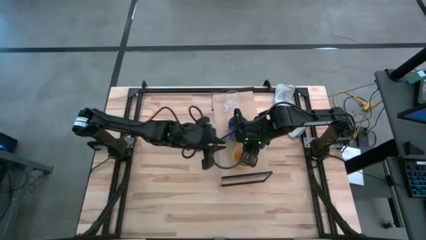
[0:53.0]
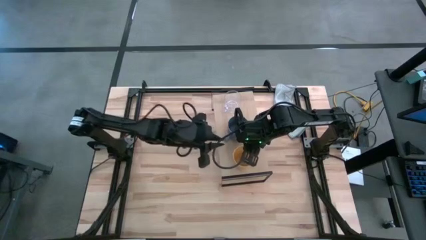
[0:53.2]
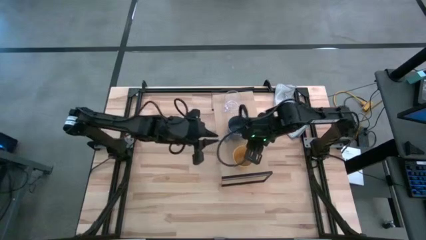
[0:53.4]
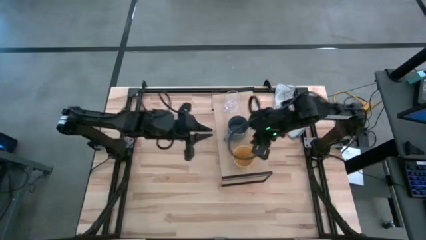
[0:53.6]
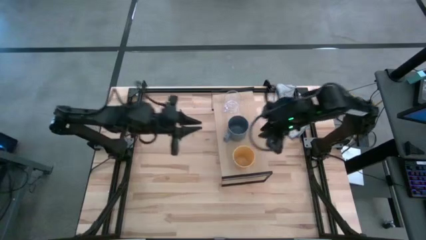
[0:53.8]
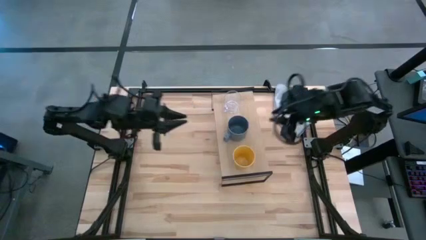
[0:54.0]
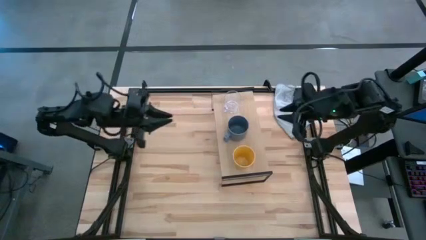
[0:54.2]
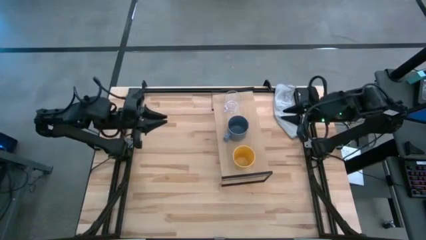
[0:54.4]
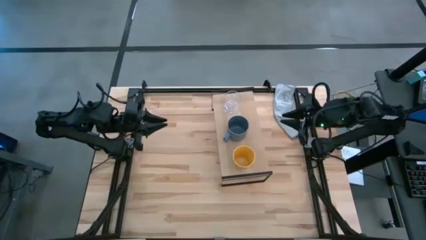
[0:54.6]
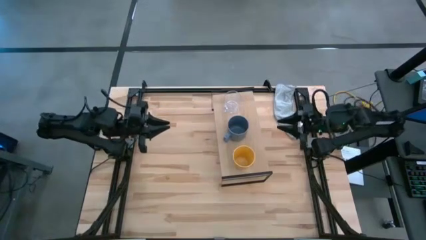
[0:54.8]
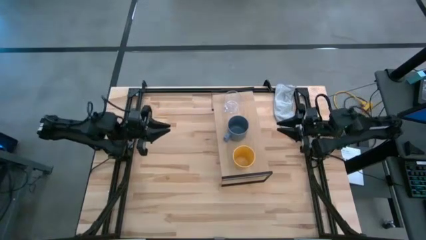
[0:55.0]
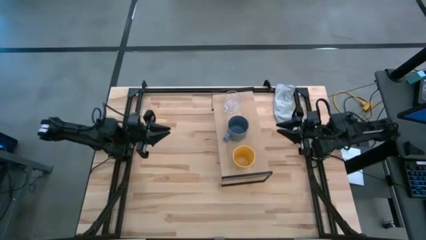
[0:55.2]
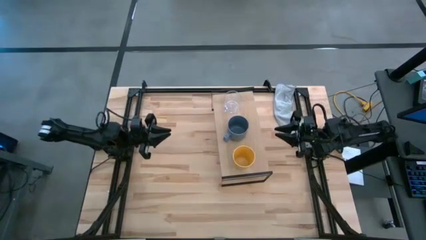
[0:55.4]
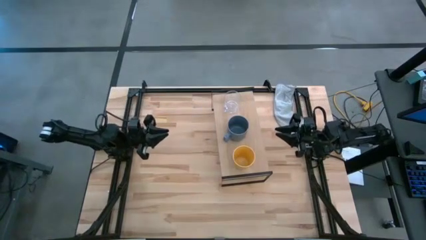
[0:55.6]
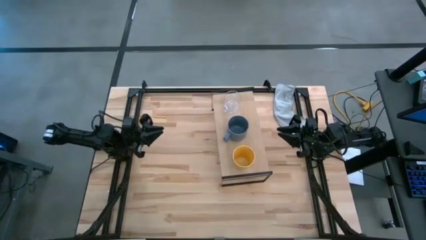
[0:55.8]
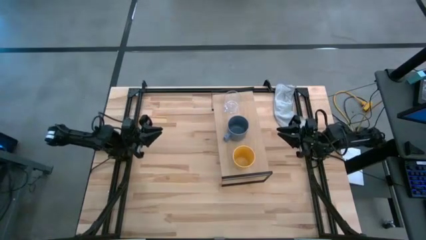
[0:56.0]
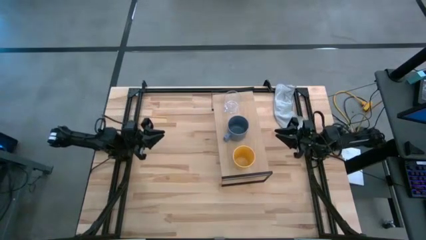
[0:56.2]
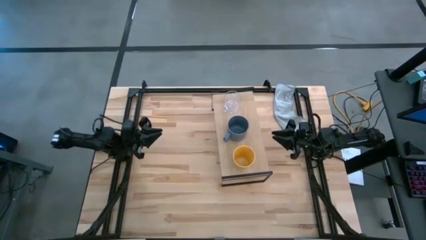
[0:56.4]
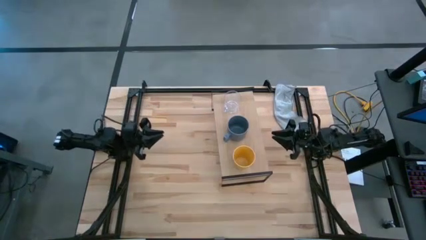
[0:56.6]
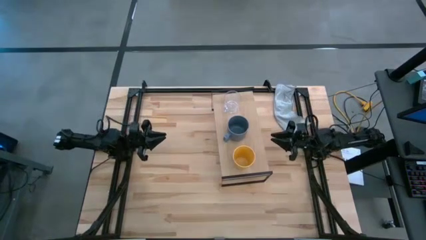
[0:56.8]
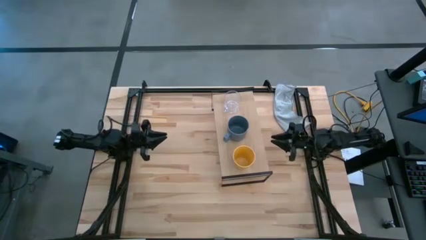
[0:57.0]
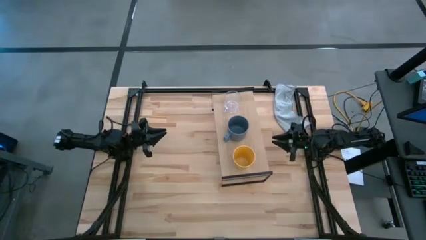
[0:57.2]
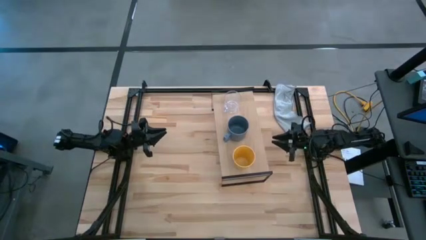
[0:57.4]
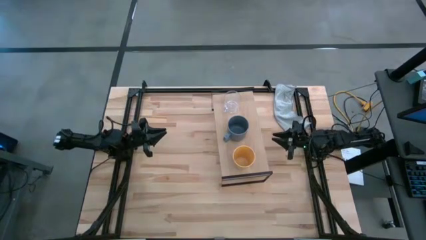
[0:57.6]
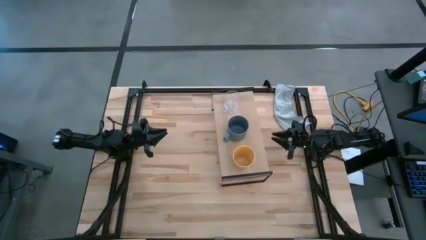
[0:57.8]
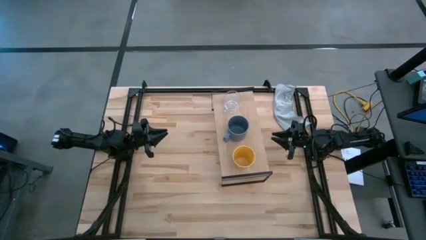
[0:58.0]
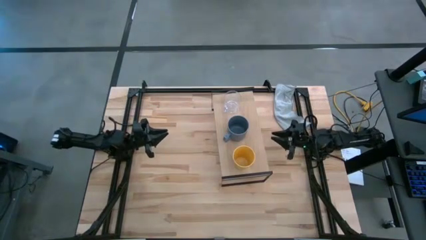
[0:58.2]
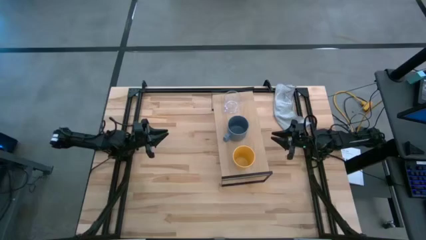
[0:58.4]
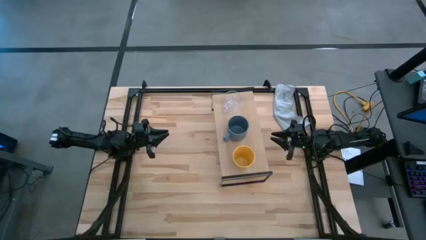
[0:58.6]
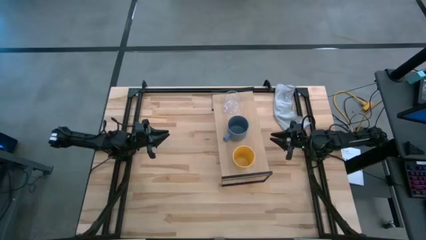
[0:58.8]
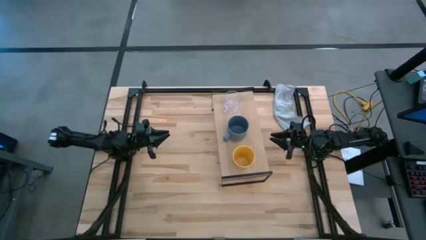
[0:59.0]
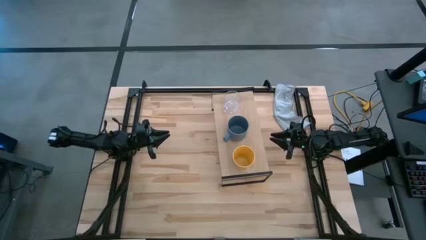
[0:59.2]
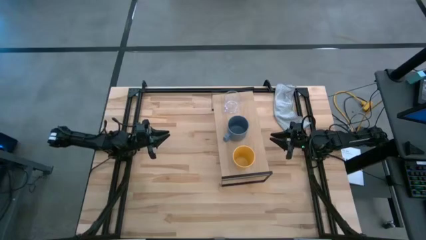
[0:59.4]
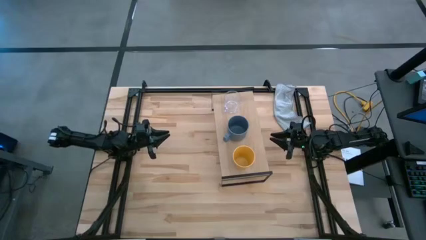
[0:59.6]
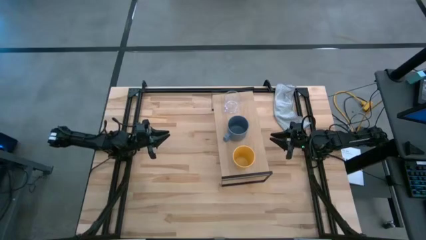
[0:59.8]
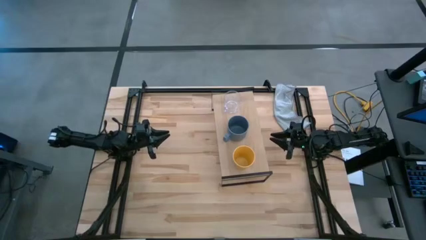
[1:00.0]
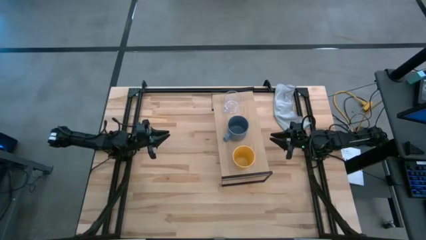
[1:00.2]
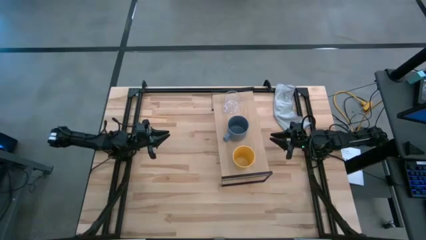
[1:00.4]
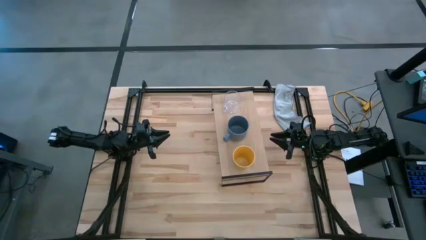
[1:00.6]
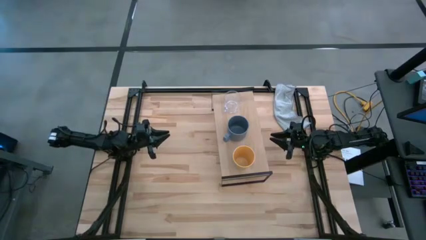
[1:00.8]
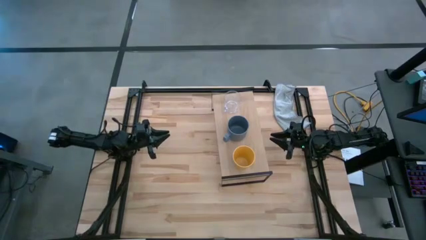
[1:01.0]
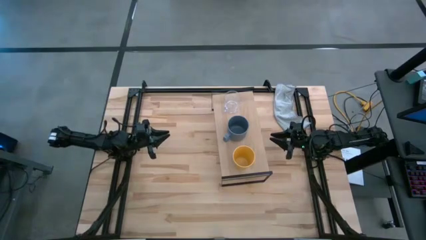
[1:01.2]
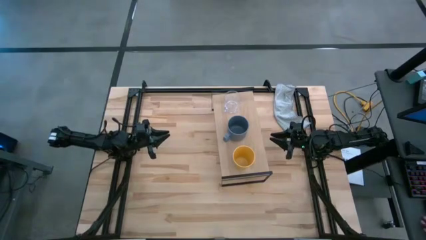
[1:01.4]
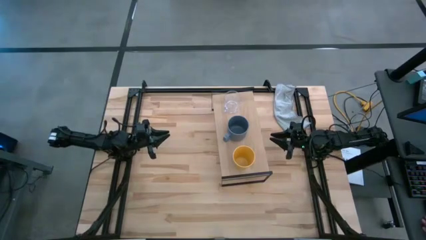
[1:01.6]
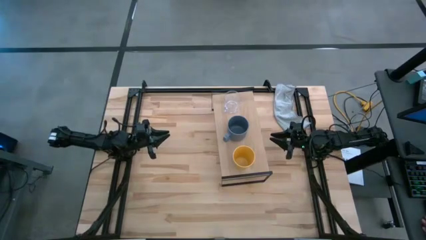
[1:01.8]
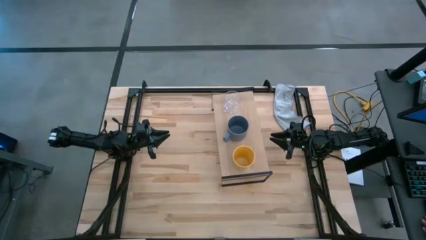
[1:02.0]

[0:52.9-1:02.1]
Task: Stack small to large cups/mugs on shelf
Return to Home Position

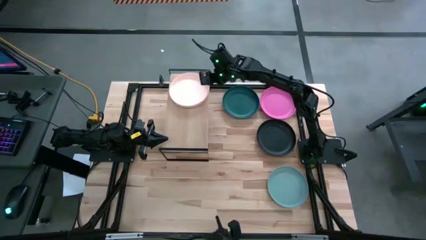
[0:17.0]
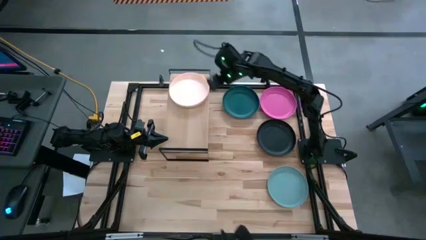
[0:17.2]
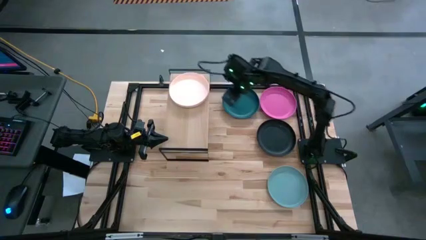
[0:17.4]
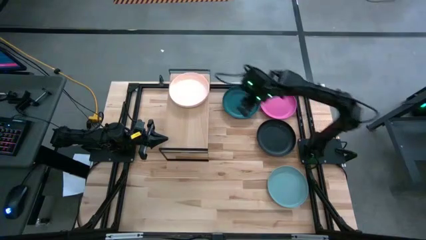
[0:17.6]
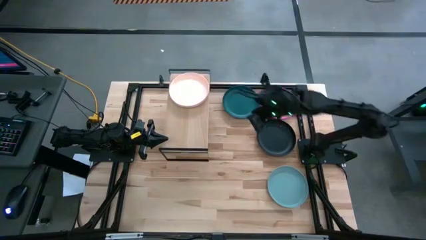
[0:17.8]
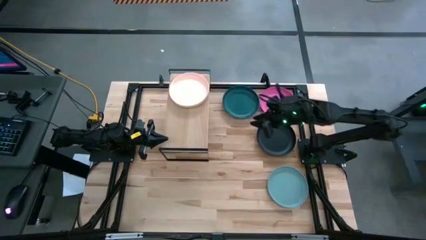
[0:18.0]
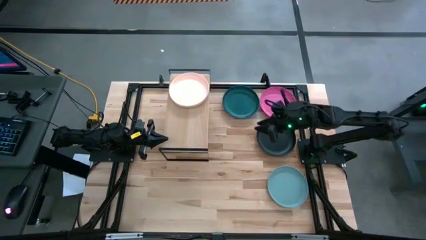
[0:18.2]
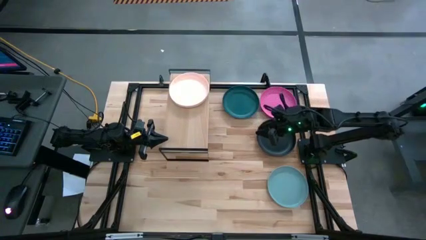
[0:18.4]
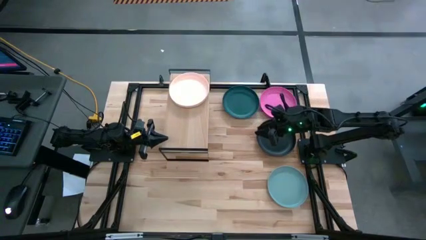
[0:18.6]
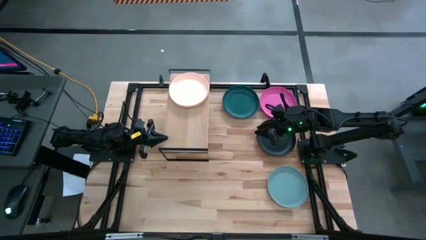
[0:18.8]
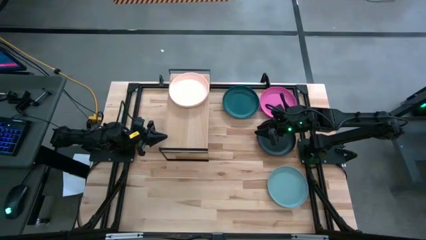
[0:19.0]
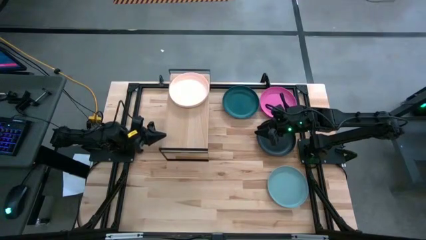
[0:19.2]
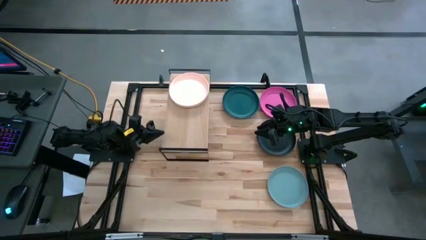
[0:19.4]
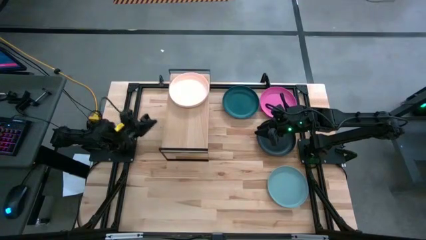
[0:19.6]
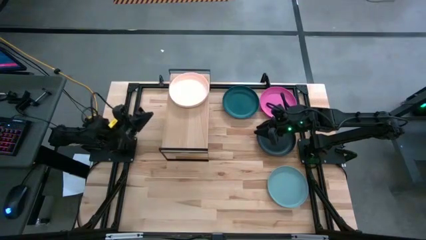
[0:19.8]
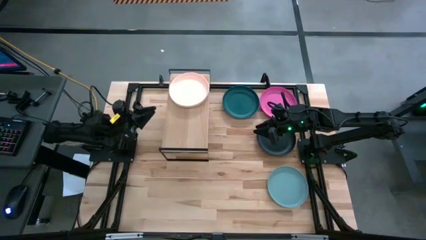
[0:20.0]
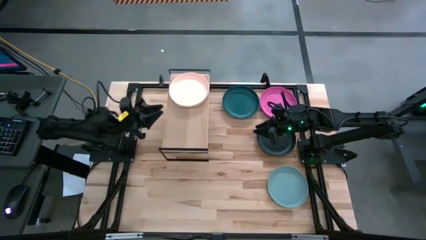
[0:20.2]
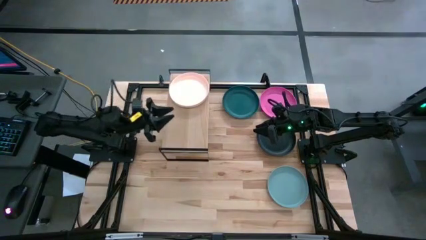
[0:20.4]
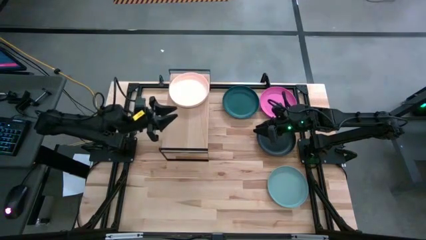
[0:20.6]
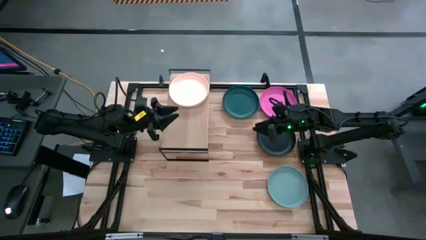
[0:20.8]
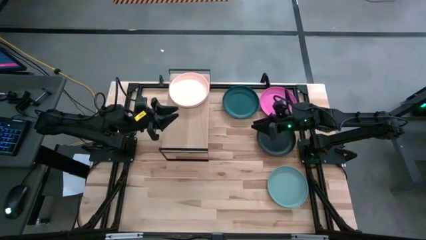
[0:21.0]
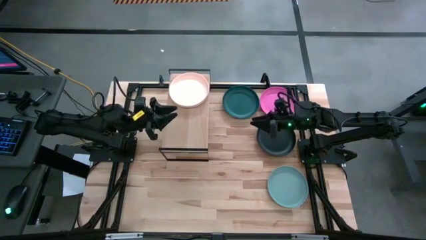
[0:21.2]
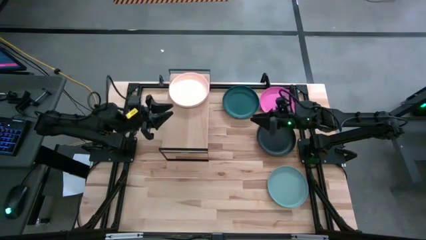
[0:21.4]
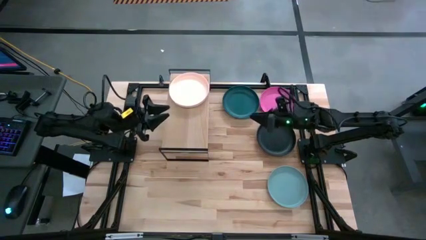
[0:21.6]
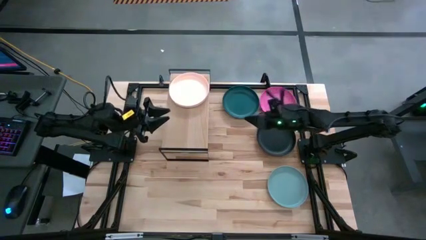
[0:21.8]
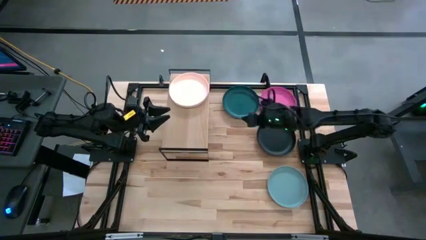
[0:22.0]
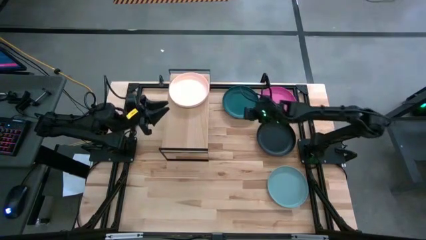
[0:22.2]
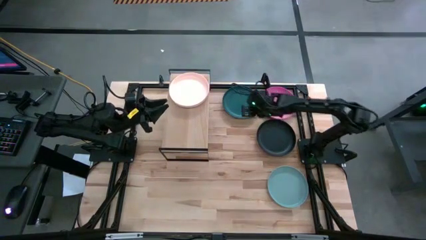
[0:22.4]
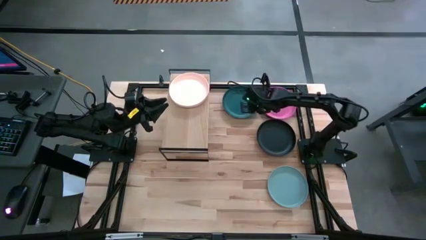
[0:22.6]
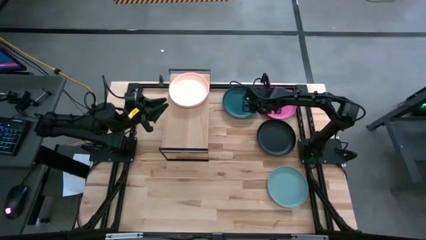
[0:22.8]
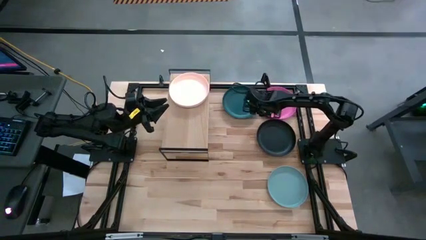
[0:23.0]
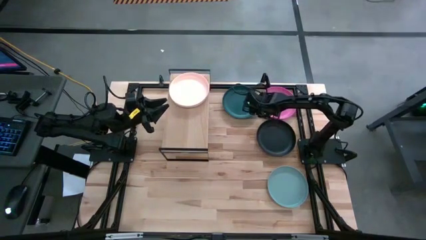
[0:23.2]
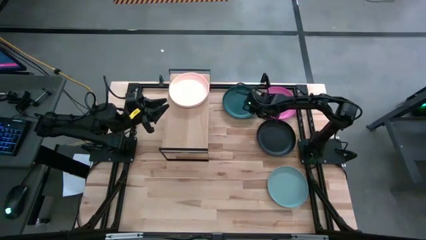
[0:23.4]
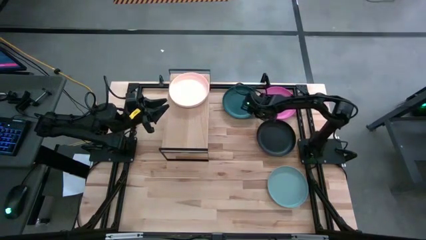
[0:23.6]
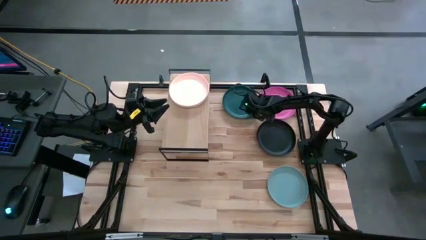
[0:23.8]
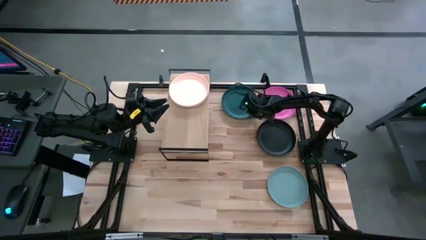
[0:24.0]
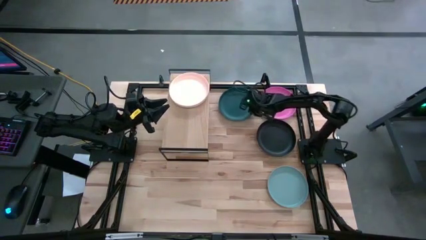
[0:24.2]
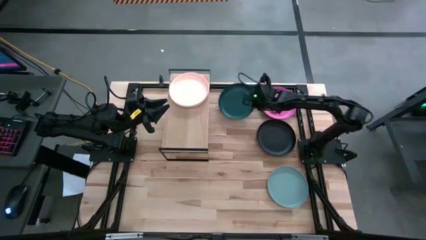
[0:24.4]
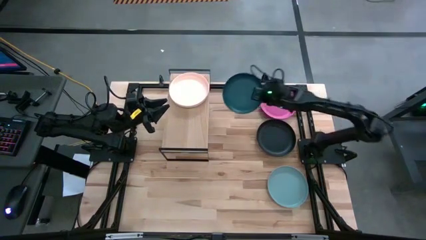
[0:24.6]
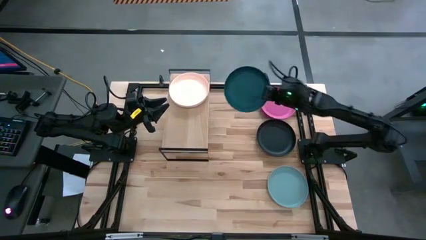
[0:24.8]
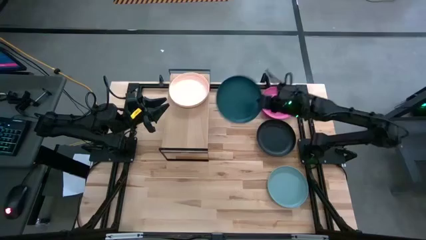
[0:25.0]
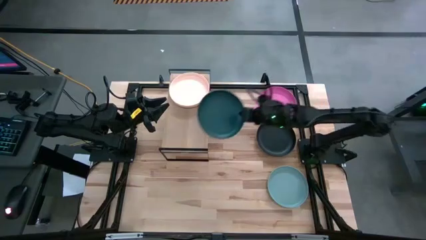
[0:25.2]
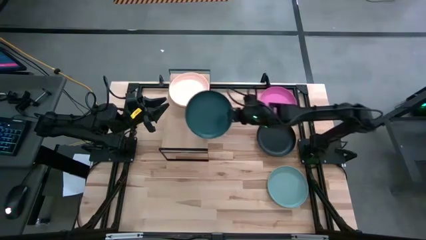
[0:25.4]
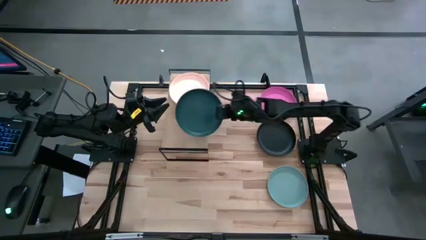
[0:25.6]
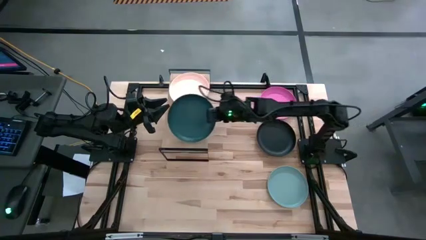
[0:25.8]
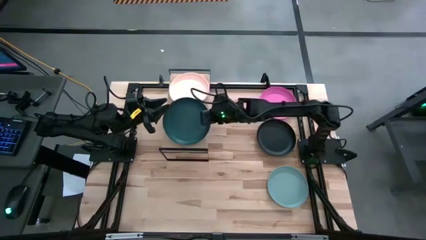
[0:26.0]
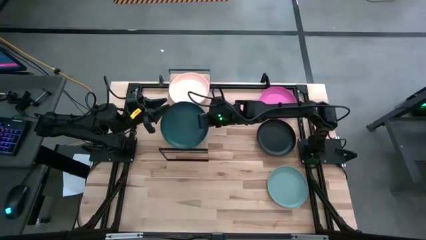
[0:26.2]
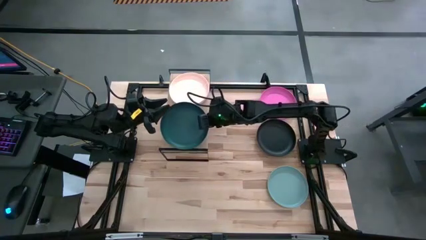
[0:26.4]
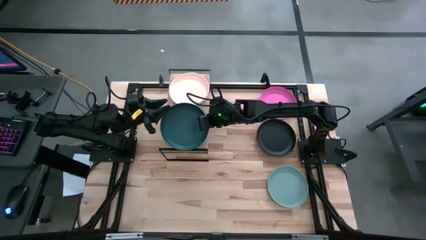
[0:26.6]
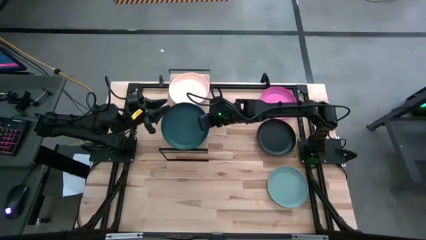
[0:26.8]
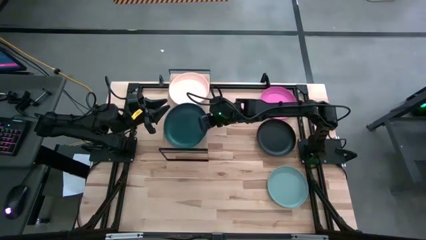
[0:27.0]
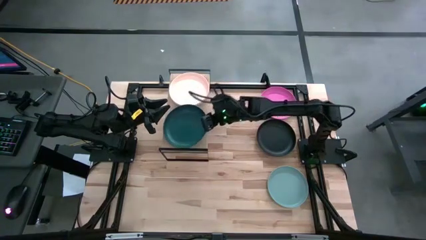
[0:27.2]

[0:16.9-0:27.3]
Task: Place and stack plates onto a shelf
Put the dark blue plate on the shelf
